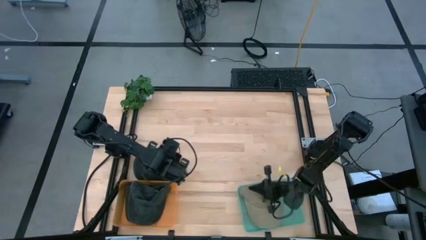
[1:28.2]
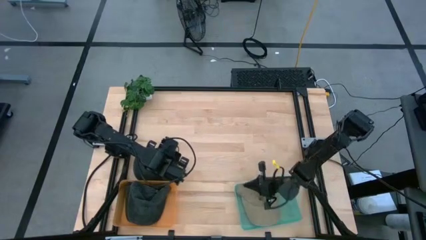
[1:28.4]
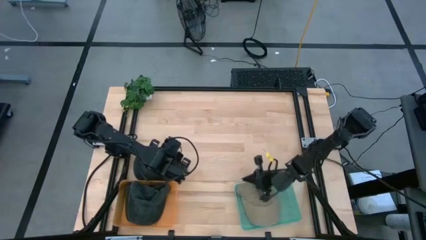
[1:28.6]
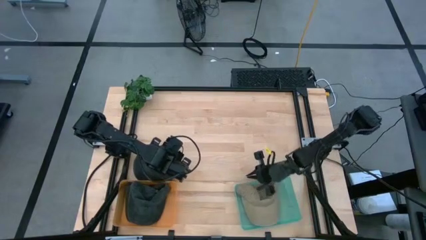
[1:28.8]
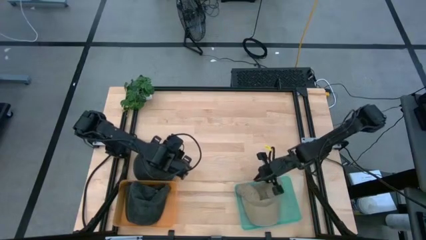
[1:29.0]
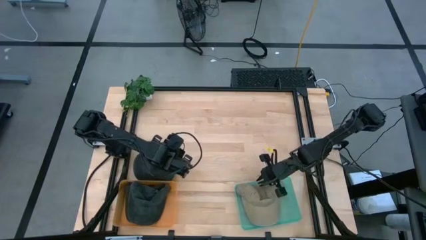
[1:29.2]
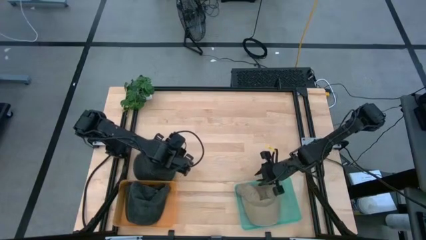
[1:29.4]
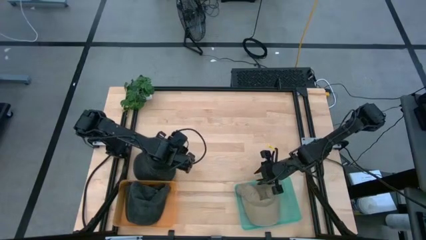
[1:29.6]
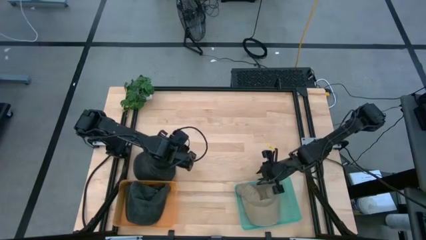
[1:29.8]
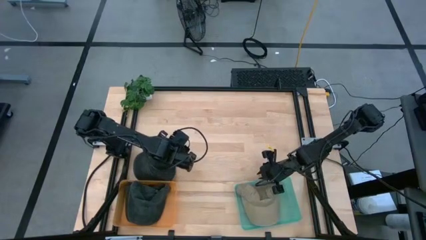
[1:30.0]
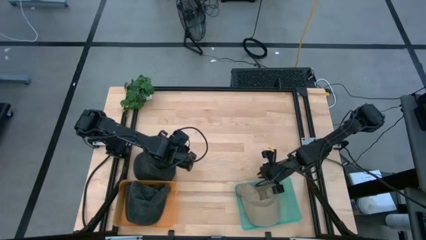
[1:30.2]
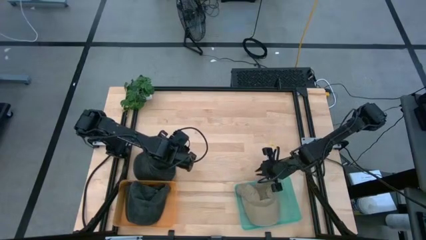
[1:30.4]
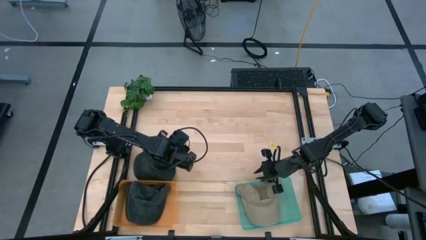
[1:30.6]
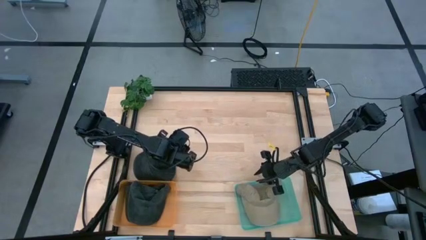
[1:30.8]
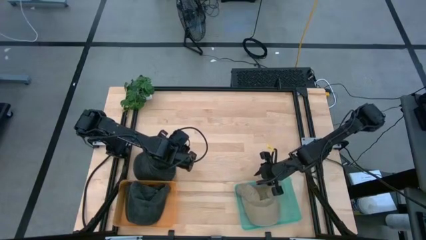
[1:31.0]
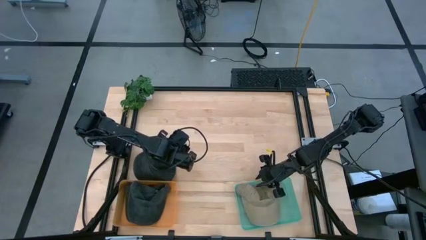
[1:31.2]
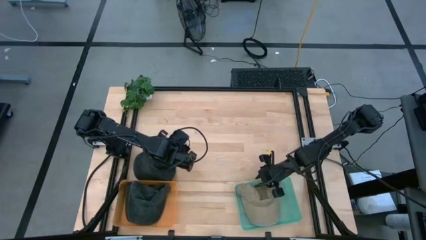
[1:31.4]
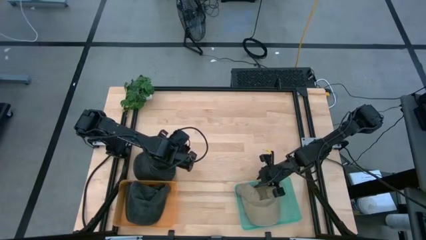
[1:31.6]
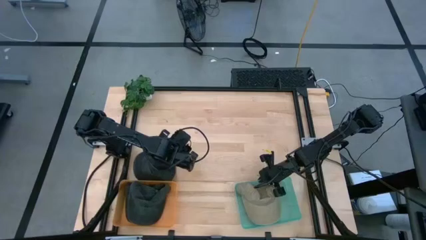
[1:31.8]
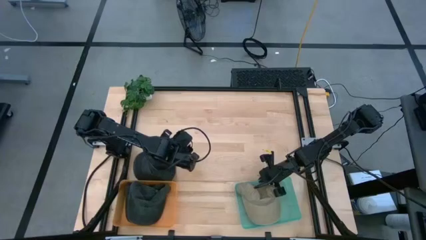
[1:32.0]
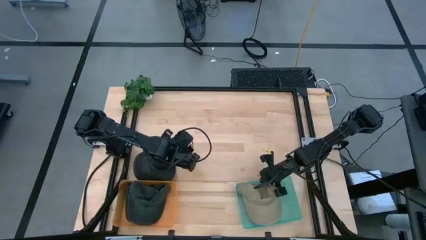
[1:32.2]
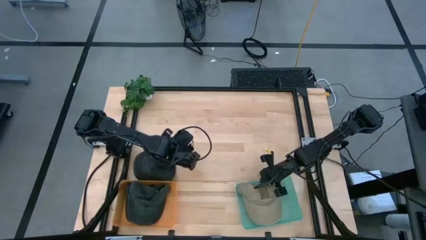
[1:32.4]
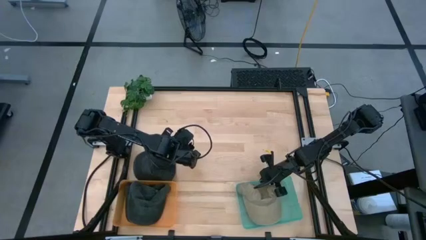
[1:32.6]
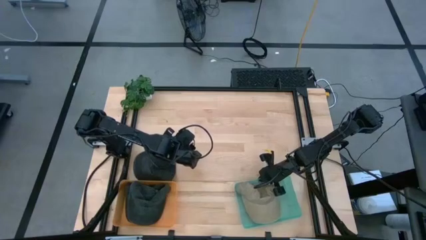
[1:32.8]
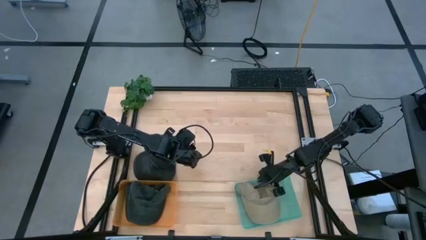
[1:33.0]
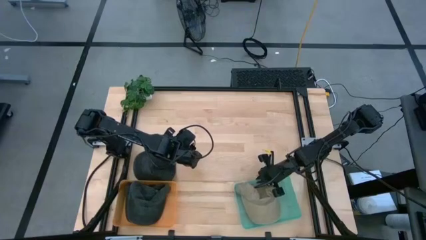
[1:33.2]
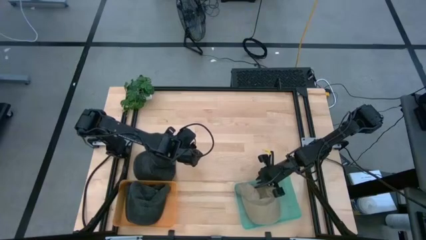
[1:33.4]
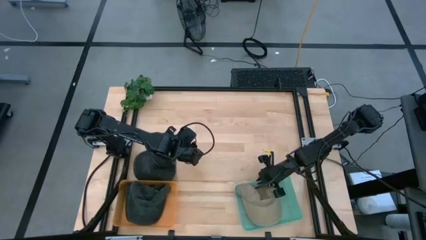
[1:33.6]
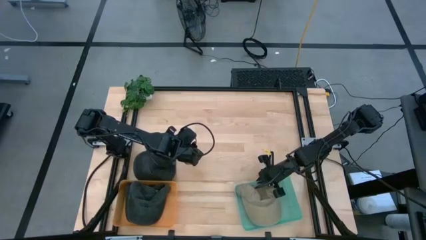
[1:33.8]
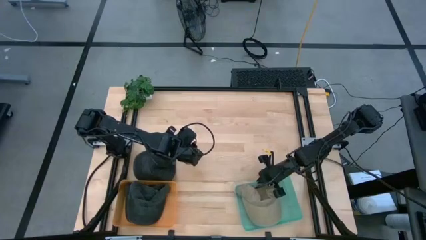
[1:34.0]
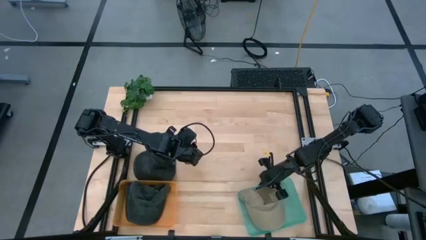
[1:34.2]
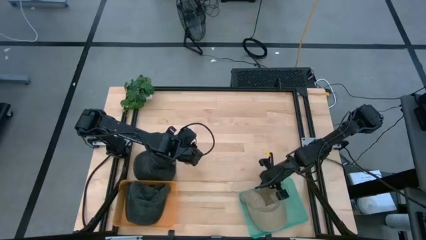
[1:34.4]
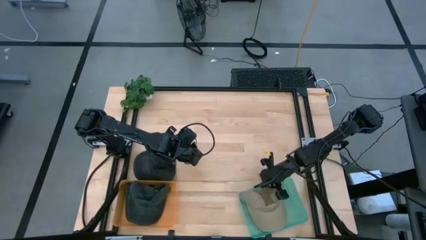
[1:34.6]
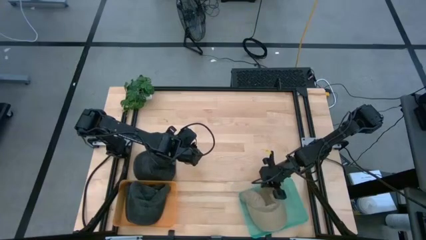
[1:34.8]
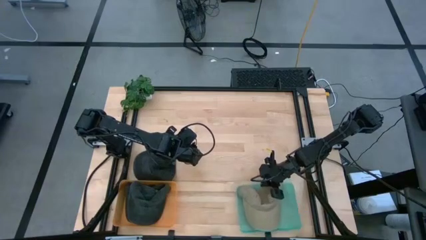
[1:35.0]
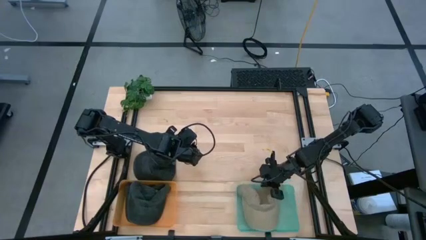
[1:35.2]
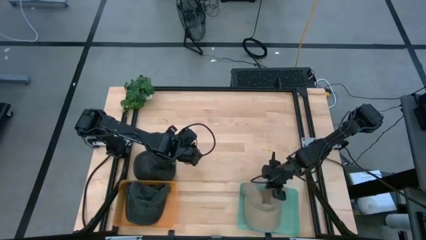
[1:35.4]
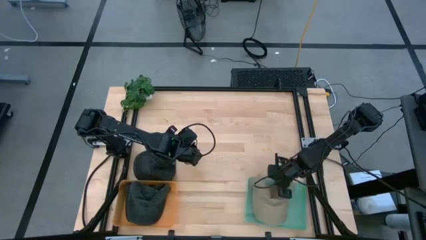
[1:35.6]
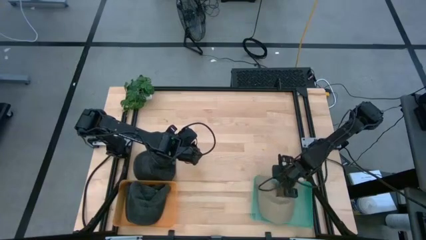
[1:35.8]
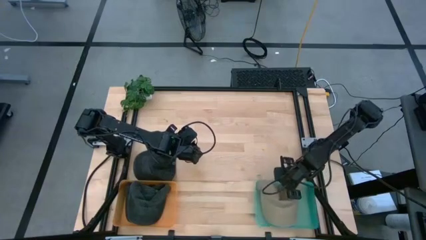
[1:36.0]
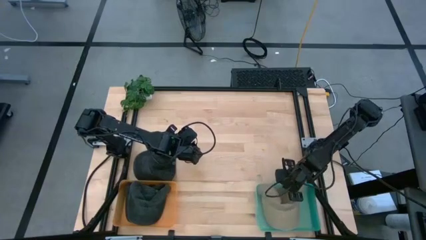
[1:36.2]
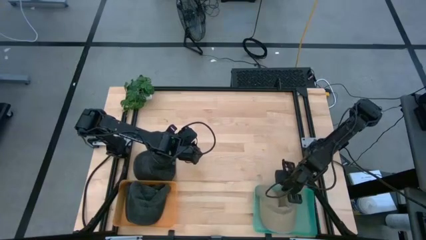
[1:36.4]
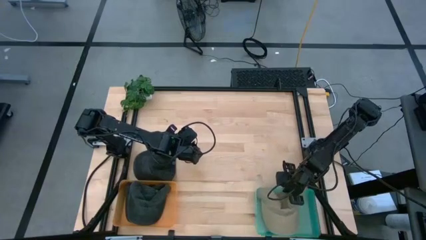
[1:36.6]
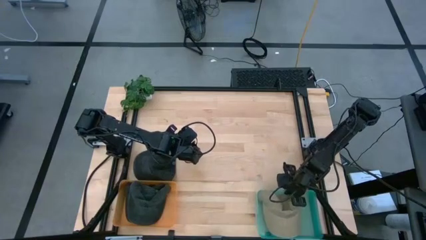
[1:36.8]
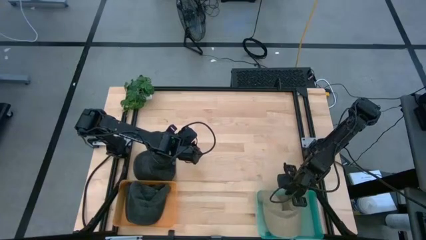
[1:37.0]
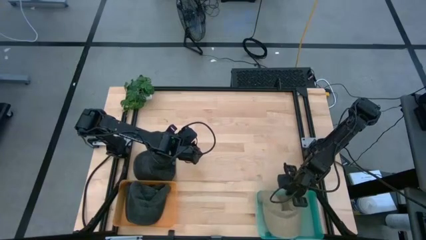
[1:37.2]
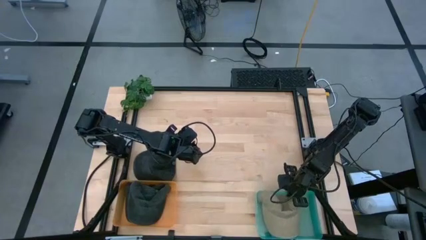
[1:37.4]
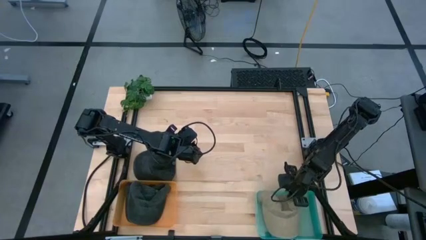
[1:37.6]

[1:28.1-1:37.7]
Task: Pick & Place hat
Adjust the blue bin on the table

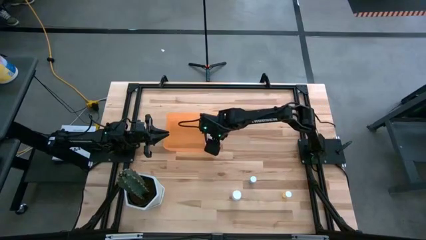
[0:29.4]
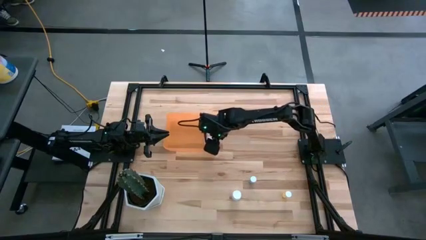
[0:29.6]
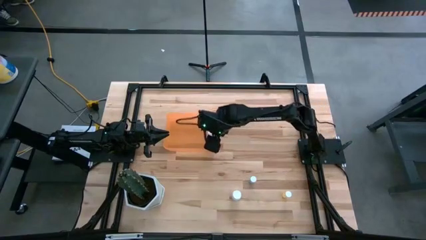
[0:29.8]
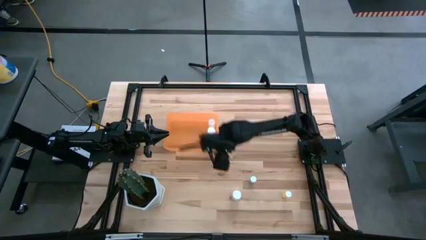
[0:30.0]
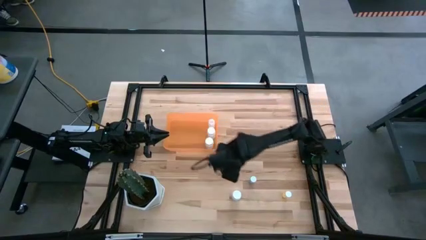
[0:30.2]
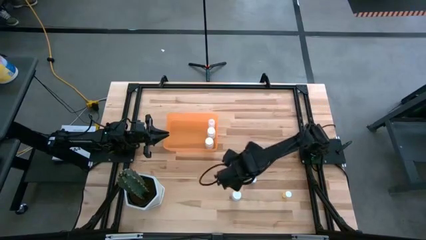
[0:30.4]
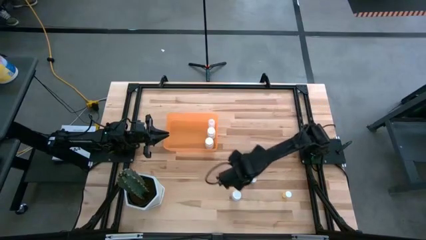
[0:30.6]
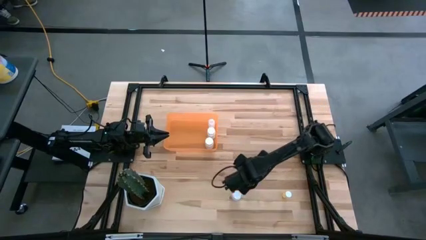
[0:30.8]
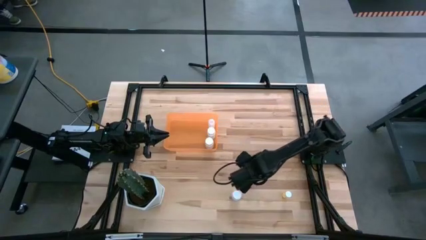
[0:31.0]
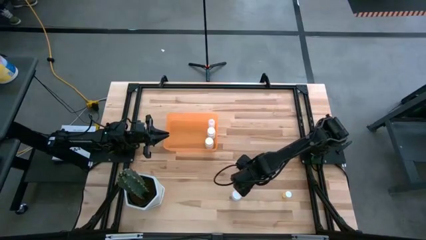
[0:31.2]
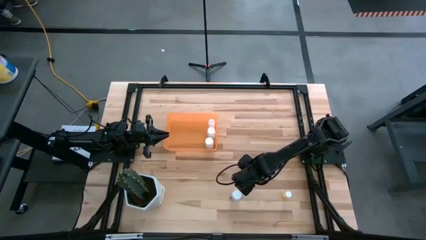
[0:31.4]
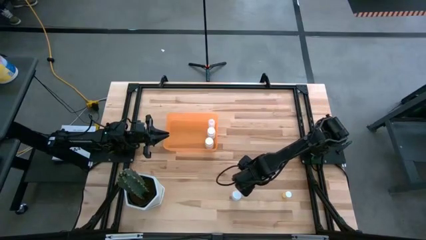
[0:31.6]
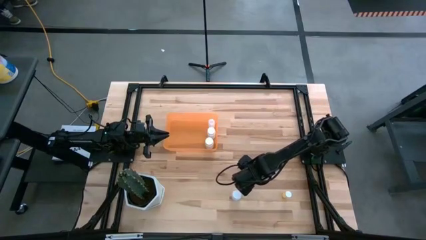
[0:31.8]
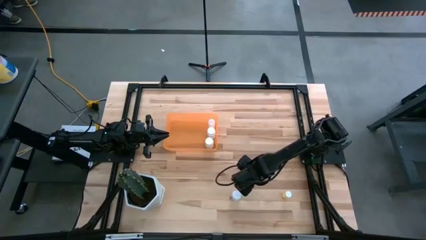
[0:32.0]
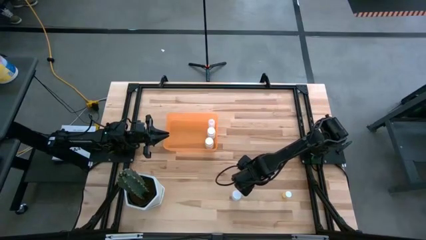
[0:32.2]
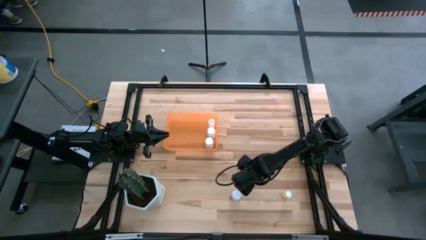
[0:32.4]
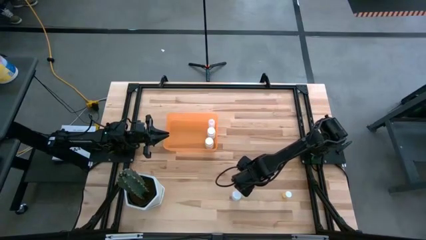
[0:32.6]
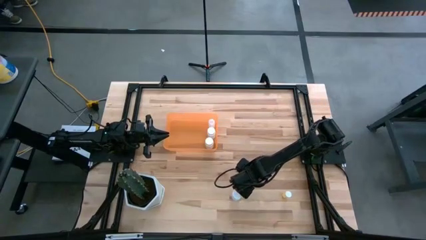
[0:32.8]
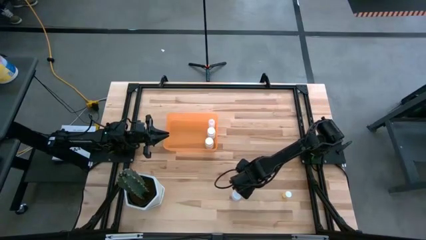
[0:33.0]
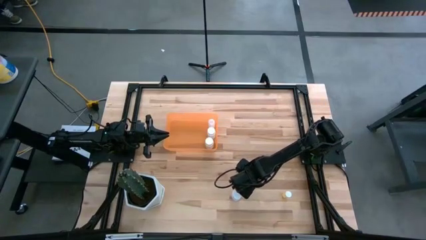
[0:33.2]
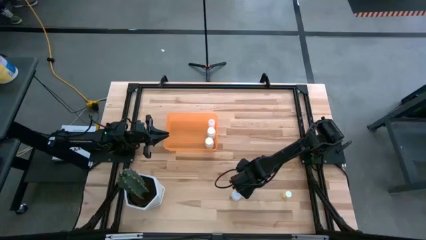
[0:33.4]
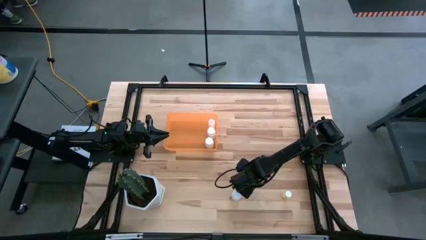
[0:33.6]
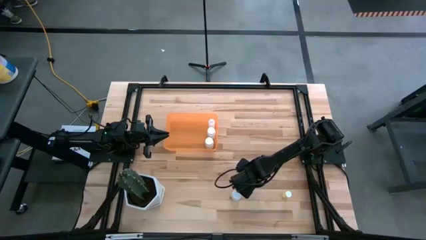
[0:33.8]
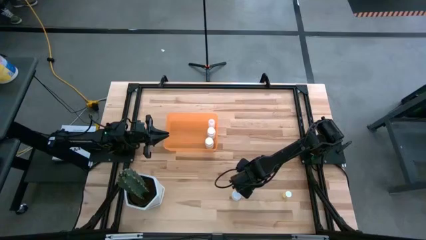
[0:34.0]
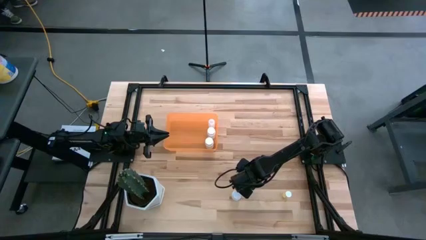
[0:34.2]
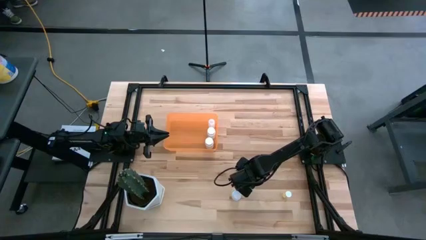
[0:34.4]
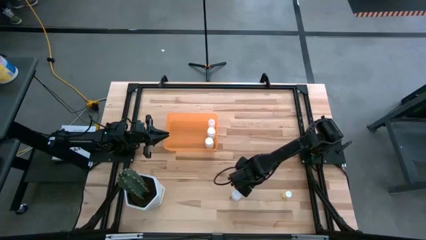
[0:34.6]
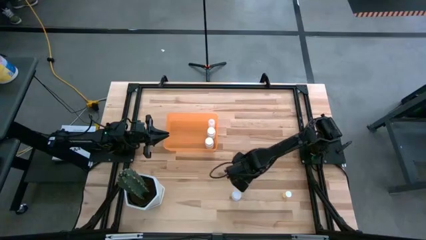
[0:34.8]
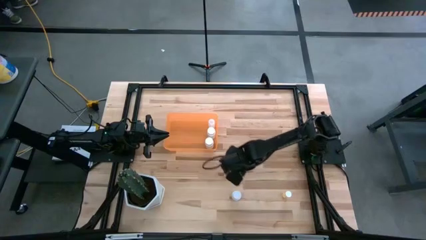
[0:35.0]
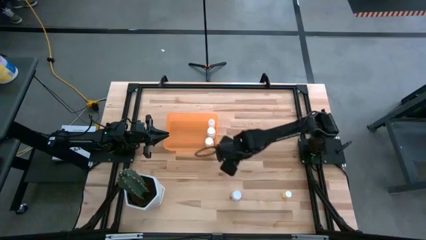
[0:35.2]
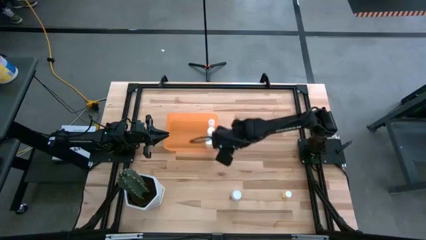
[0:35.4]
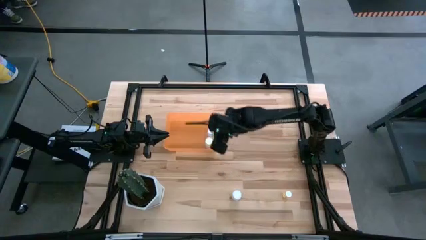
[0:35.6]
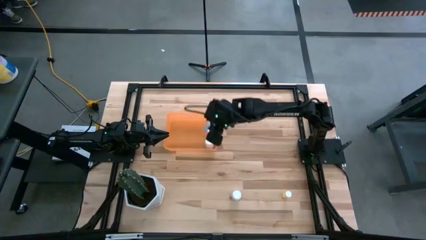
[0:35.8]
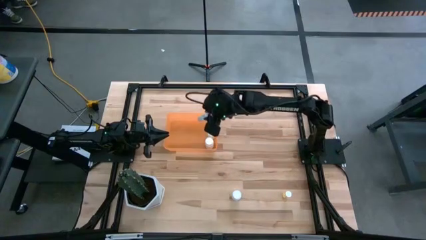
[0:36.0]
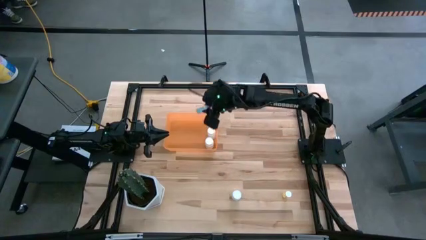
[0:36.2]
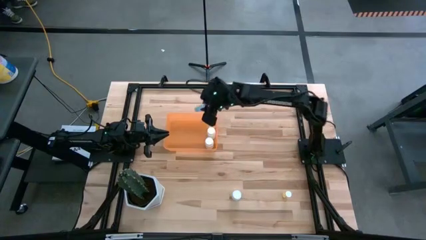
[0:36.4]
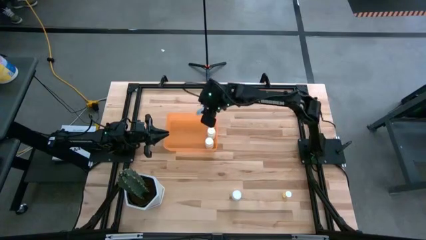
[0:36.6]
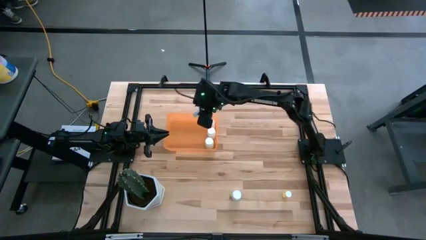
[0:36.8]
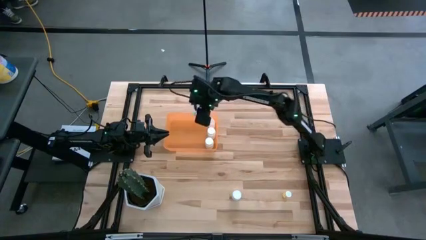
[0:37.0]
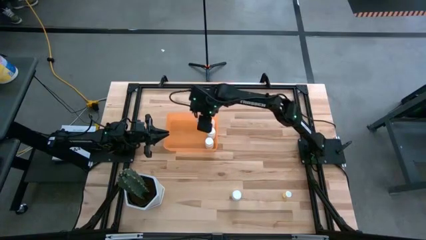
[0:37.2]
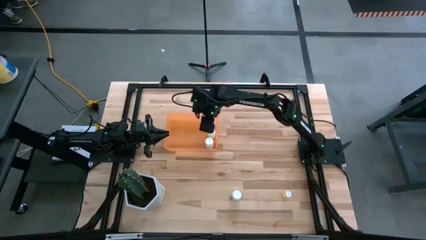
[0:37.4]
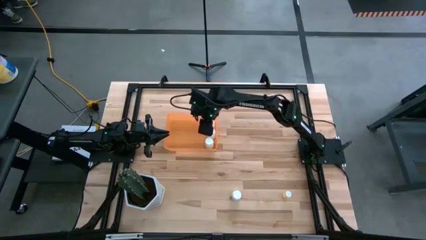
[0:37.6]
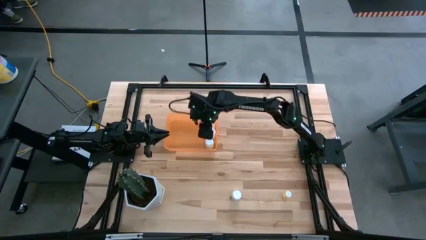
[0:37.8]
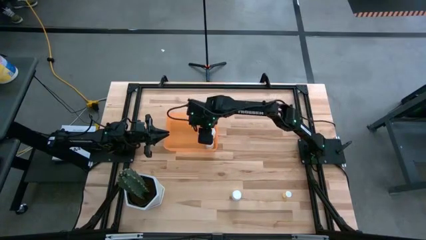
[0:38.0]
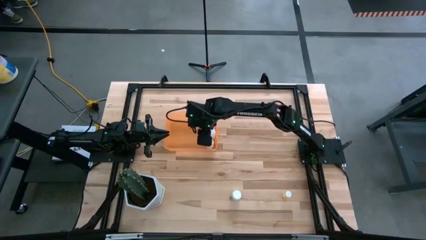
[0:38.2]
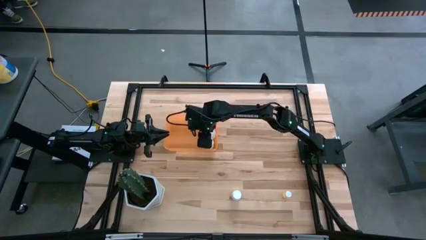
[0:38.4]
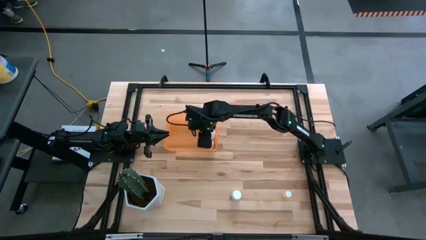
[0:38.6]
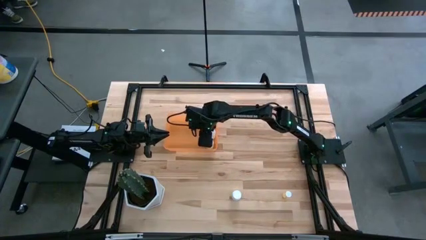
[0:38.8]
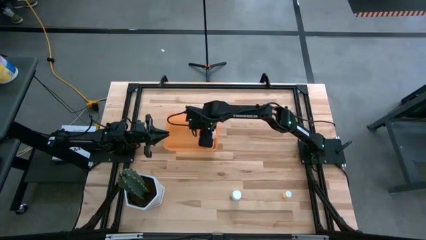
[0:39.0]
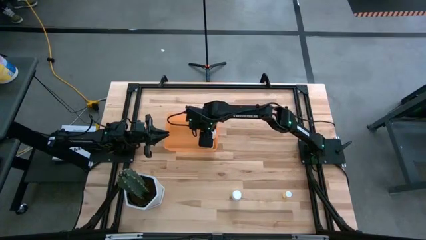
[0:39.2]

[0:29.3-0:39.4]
Task: Pick and place pill bottles into a basket
Put the blue pill bottle in the orange bin
